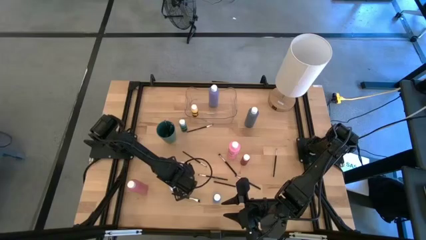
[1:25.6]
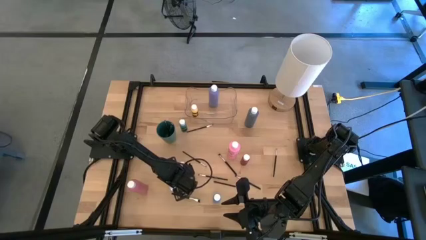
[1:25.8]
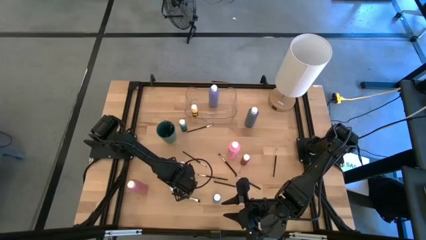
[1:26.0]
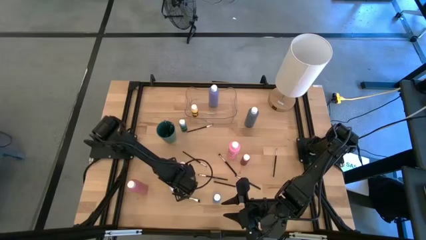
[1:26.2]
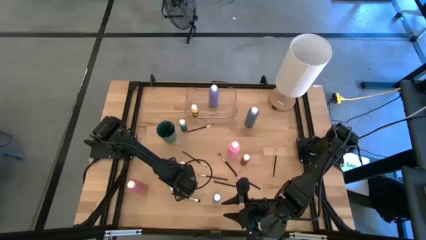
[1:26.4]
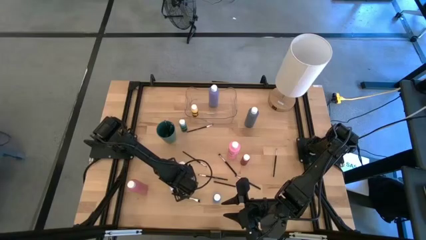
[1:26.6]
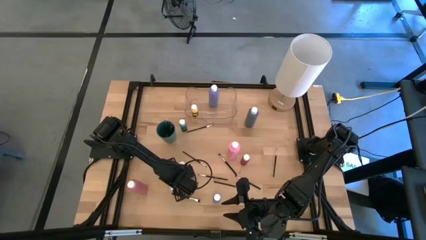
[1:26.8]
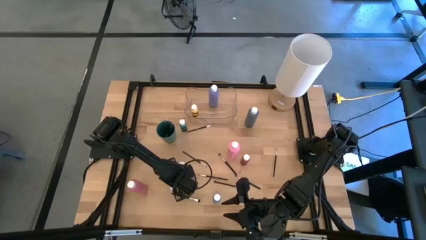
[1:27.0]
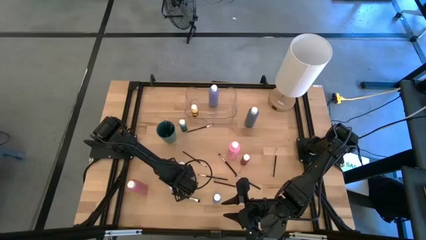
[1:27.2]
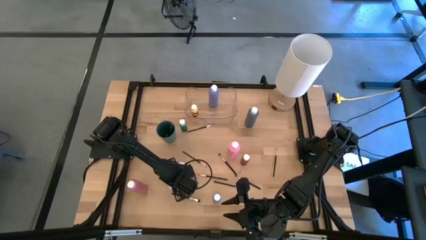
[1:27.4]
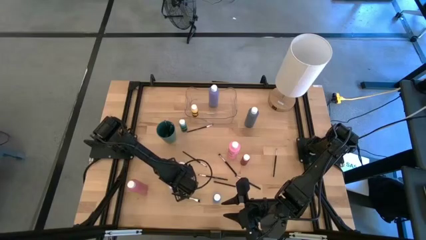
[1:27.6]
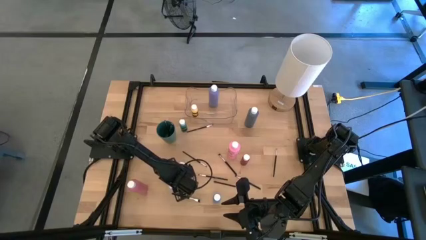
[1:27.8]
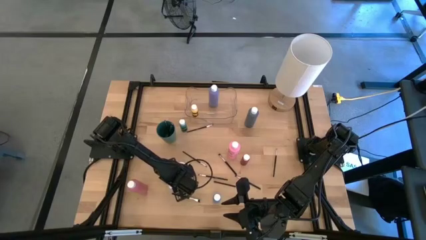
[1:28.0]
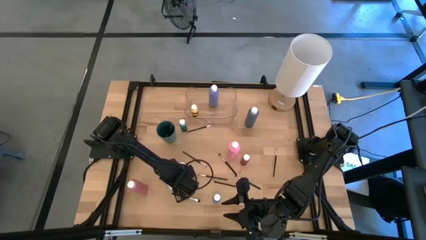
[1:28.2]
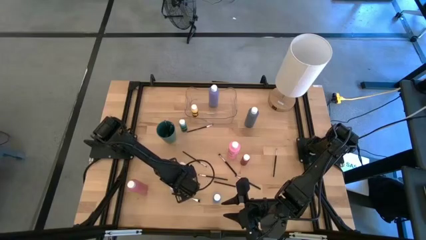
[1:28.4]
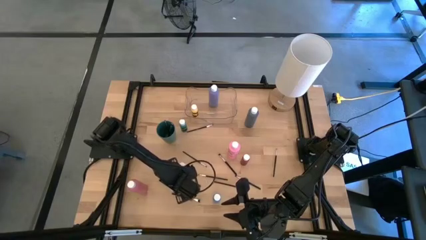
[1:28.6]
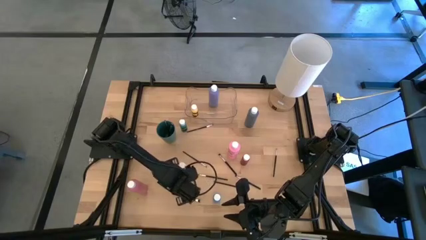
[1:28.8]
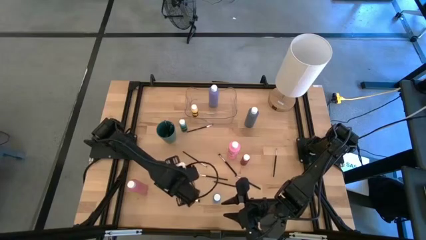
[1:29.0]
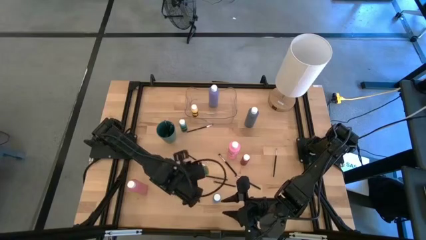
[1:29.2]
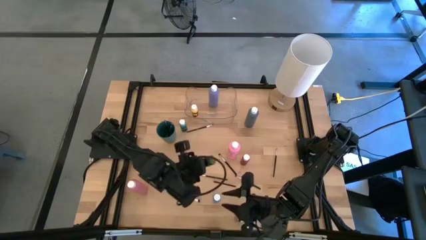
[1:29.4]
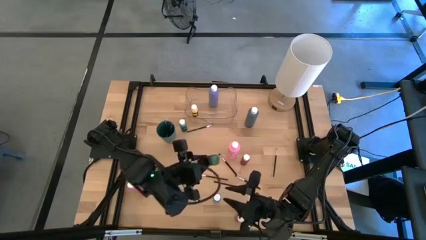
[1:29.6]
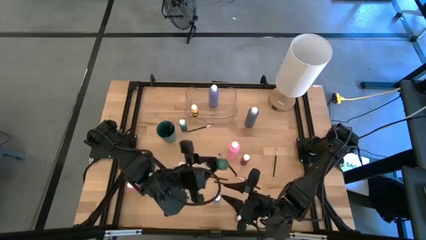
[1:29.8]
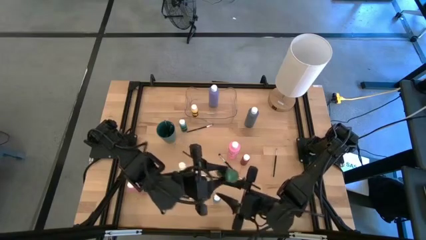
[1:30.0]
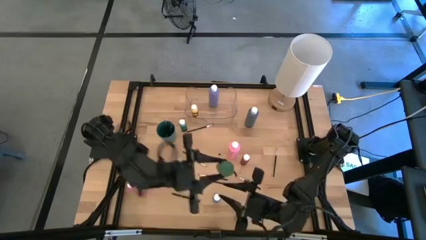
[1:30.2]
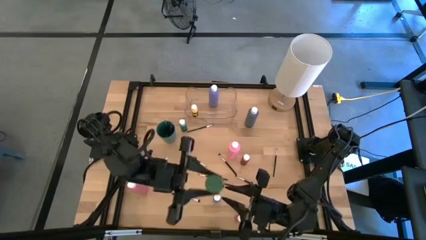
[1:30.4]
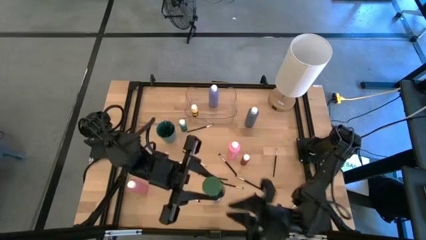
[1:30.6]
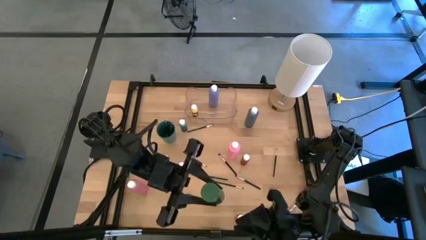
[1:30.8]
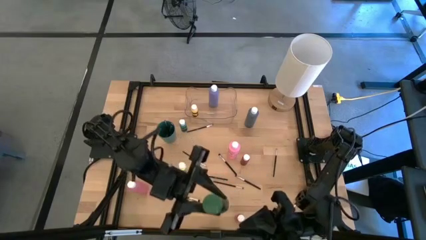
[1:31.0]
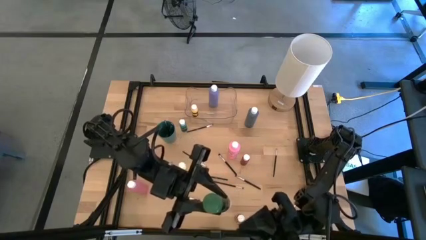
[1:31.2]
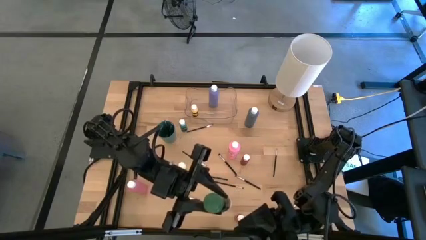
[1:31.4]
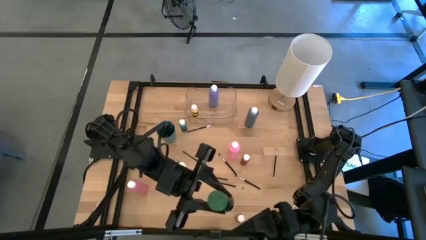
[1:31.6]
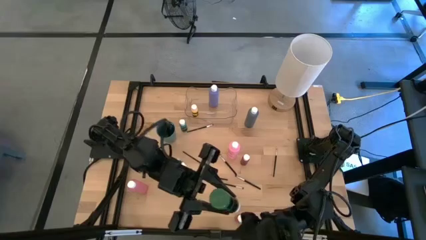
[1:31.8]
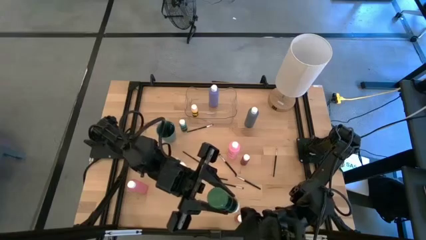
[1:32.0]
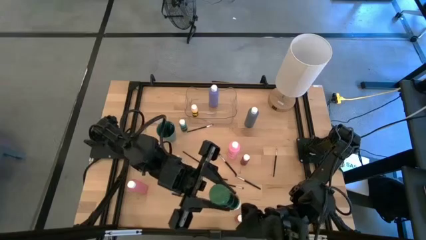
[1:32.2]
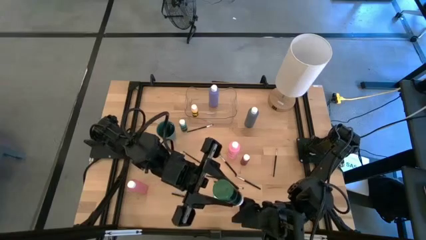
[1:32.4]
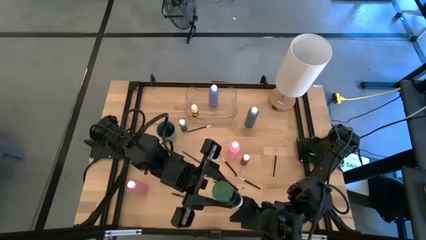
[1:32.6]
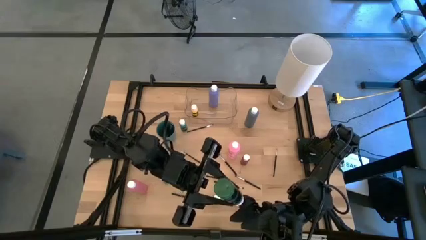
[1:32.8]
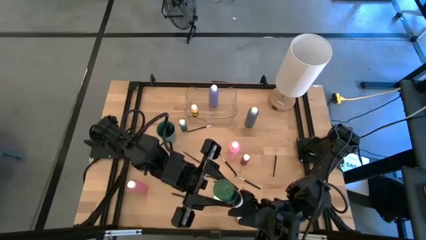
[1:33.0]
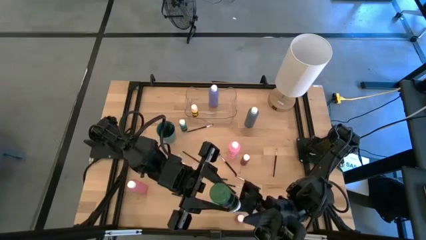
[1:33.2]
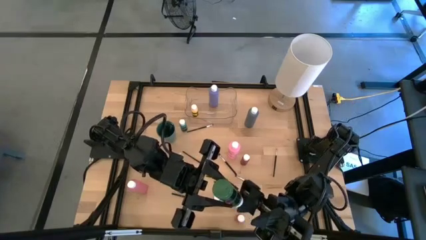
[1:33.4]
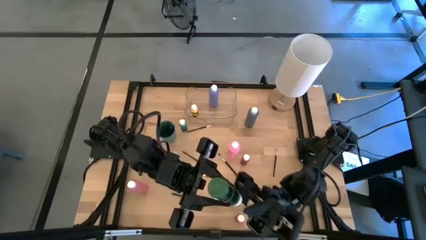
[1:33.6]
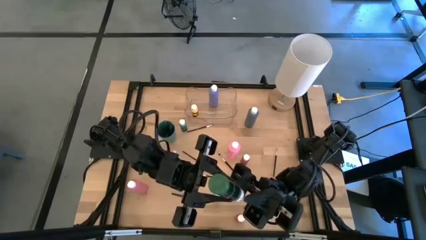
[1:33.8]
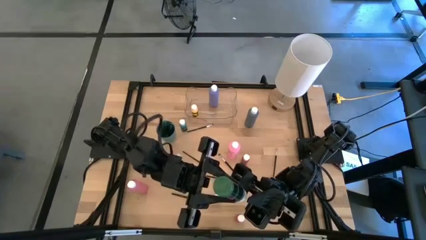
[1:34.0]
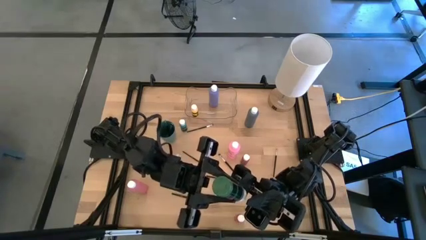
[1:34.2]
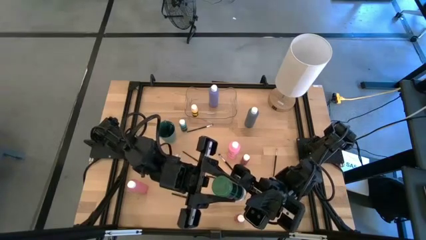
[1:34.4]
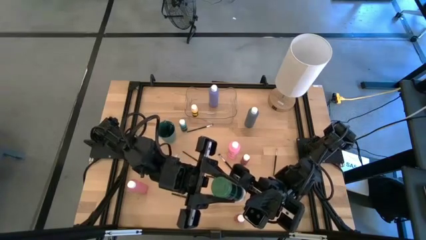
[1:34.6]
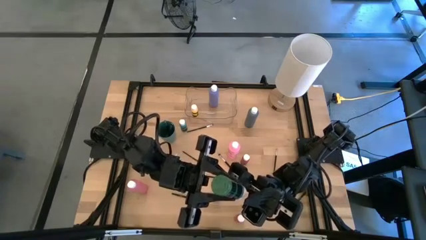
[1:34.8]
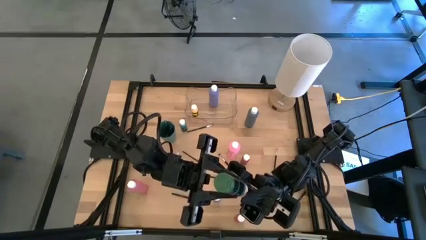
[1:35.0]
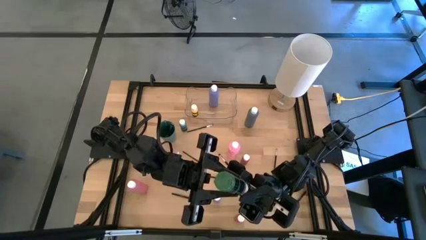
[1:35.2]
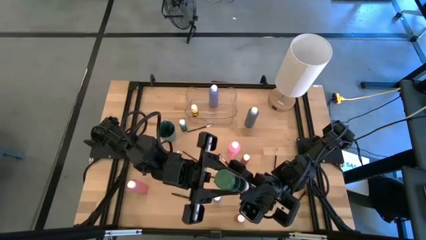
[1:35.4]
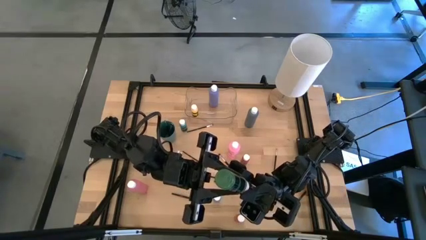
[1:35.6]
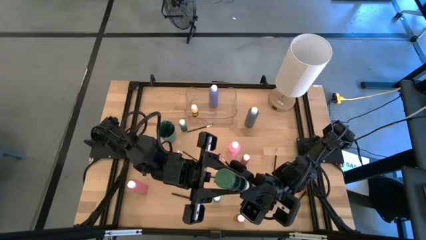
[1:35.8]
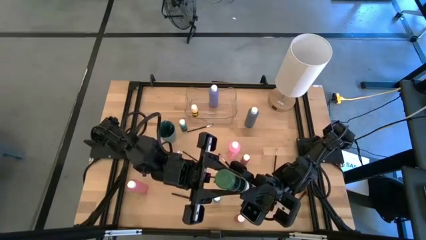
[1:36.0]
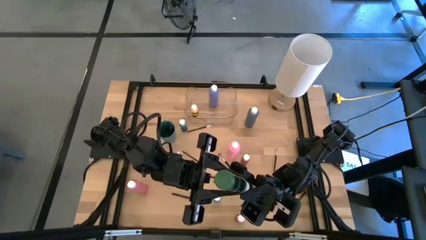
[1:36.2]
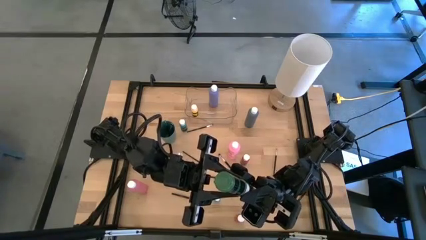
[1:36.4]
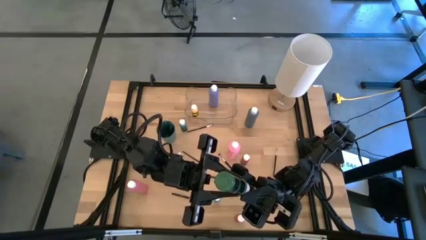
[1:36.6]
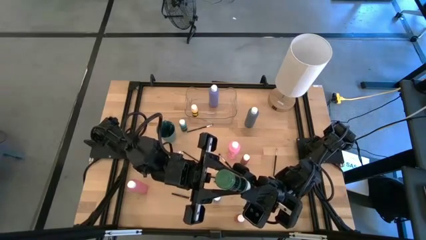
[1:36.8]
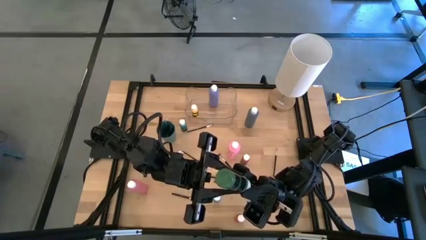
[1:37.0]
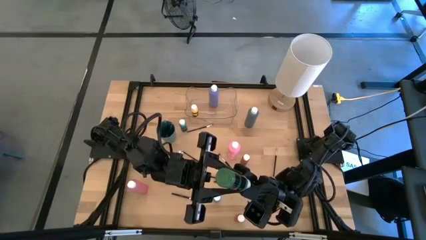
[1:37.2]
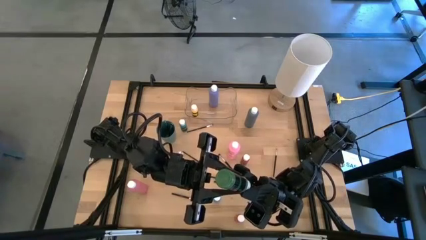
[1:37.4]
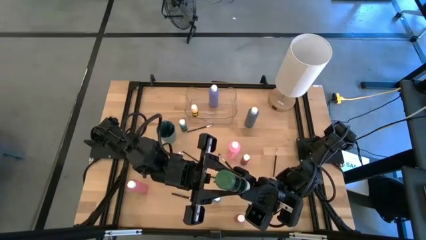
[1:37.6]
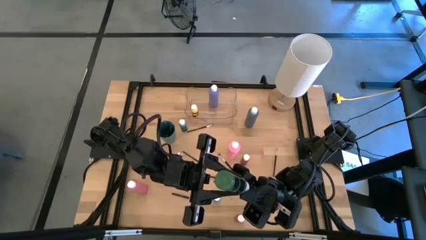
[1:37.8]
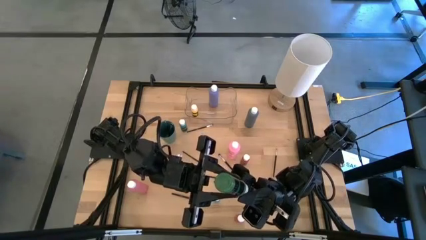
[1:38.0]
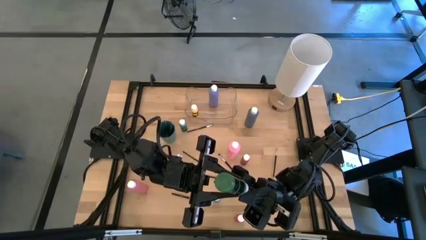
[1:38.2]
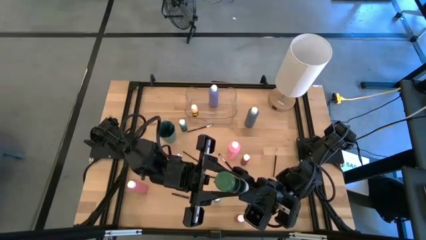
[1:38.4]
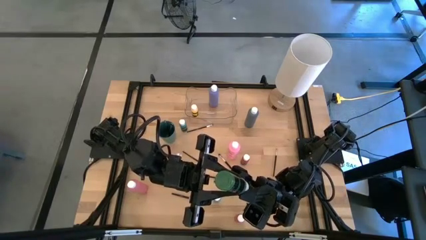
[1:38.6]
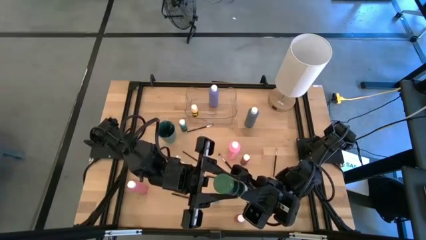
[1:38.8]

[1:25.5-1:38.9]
Task: Pick & Place Paint Supplies
Put the green paint bottle into the transparent bin

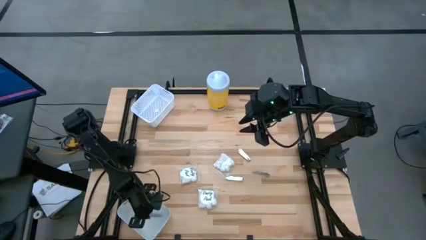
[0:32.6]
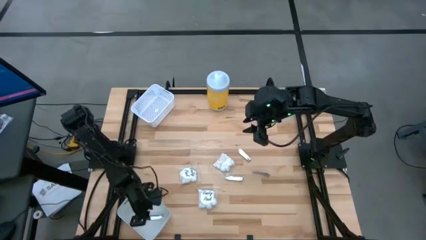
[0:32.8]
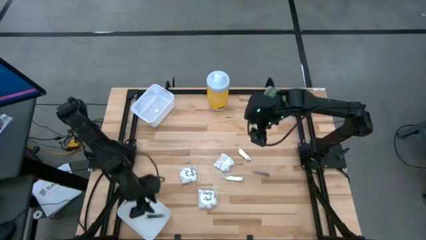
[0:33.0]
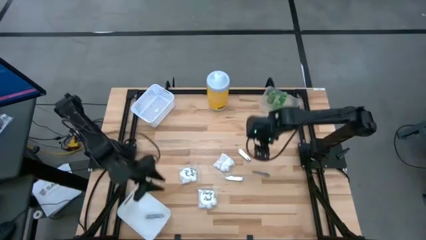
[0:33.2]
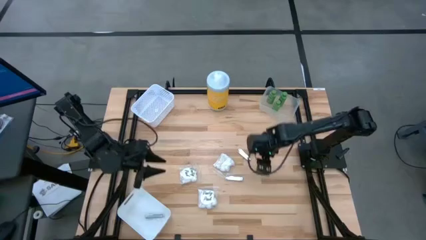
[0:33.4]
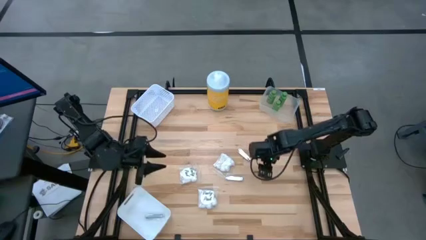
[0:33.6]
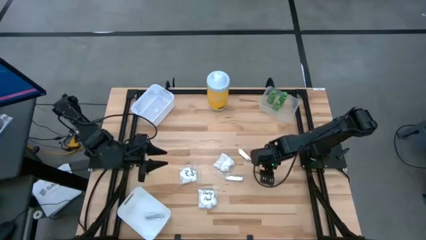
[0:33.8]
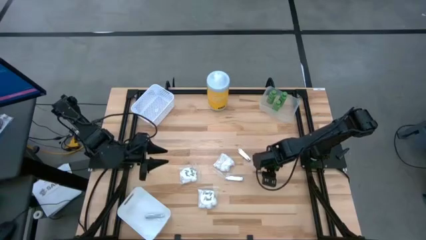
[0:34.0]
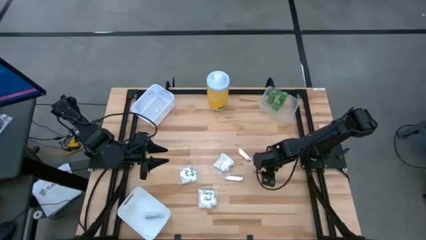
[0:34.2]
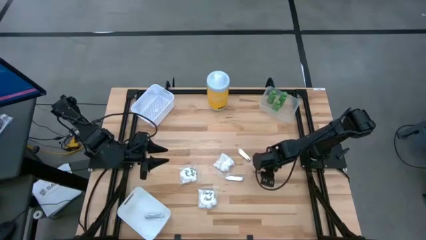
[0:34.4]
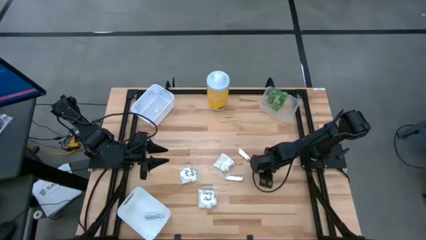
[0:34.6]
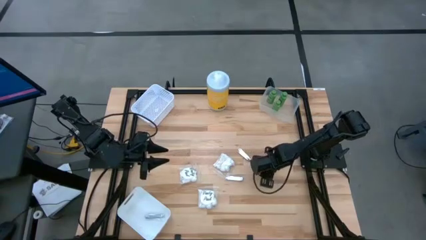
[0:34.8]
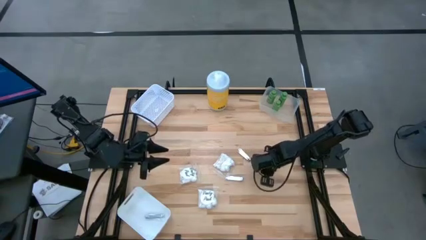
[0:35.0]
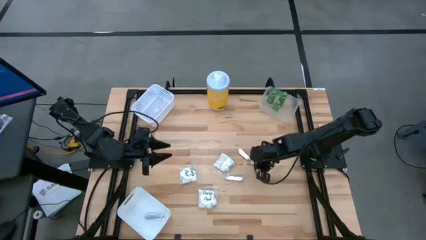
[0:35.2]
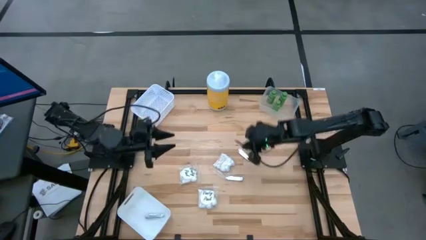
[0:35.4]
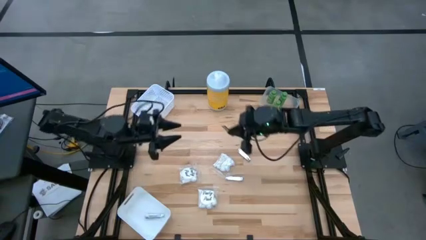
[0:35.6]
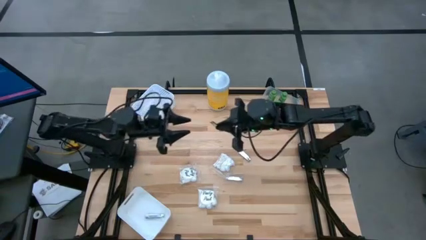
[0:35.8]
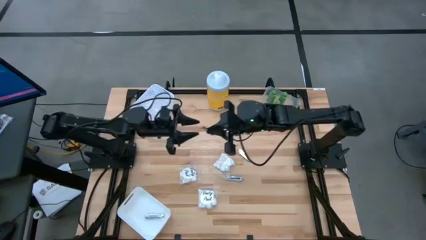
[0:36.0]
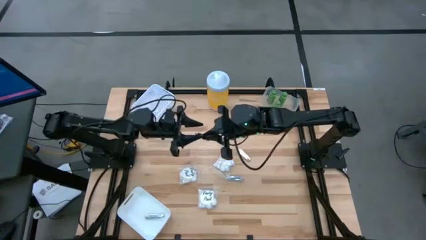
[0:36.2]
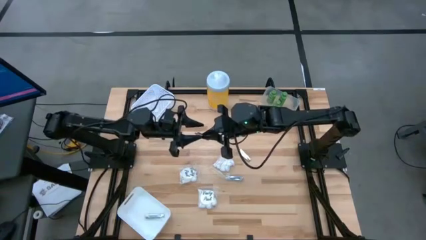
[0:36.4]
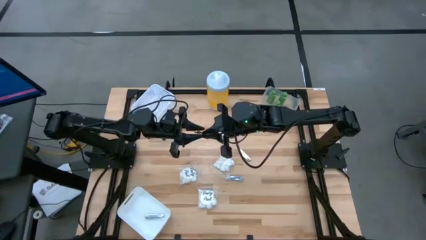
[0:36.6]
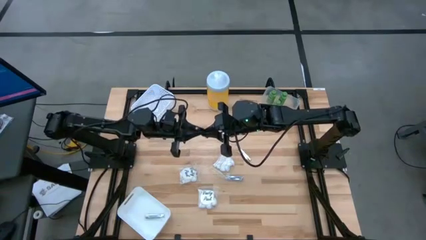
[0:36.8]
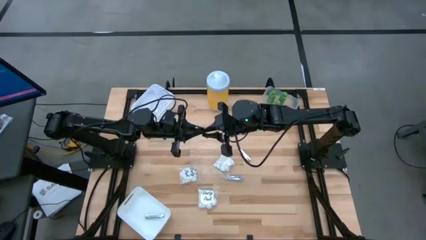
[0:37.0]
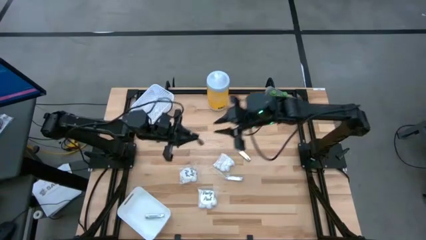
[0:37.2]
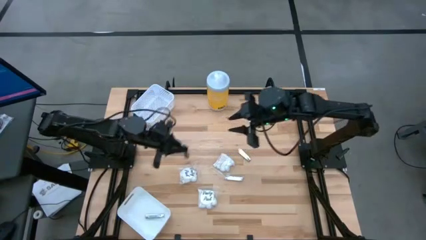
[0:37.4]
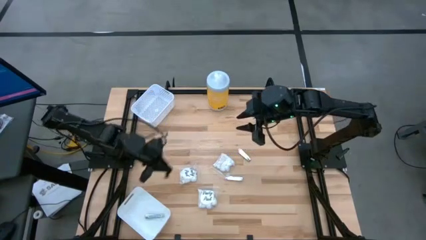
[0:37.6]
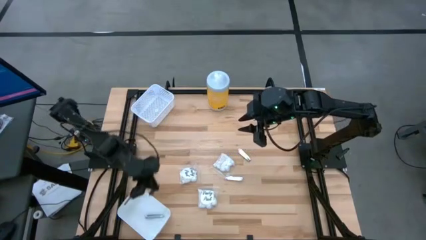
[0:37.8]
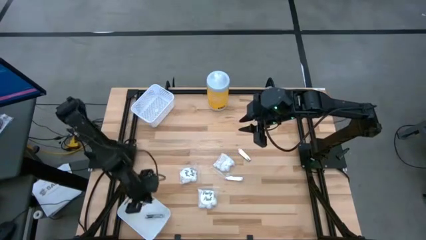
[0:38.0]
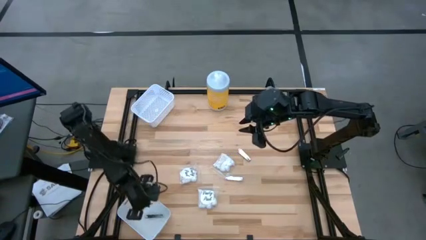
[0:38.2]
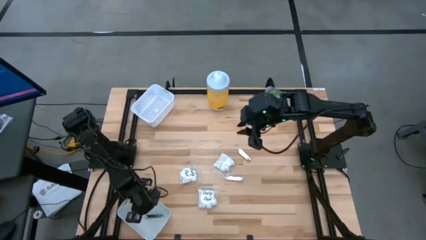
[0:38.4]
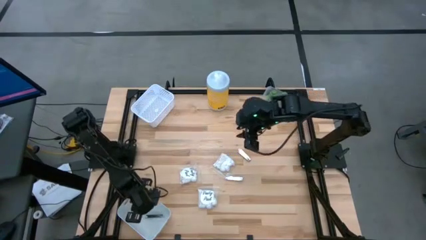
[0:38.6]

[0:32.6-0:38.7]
Task: Pick & Place Travel size toiletries
Put the silver nail cutter into the white bin
